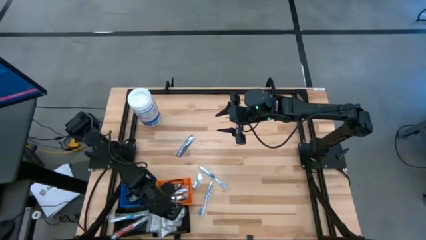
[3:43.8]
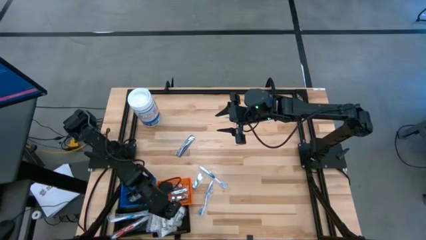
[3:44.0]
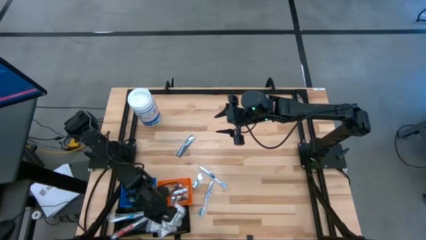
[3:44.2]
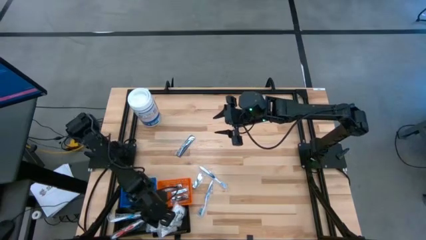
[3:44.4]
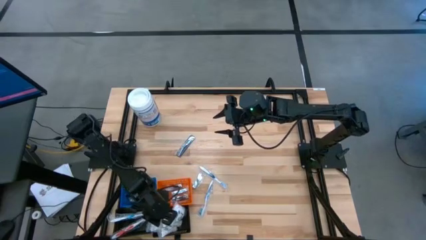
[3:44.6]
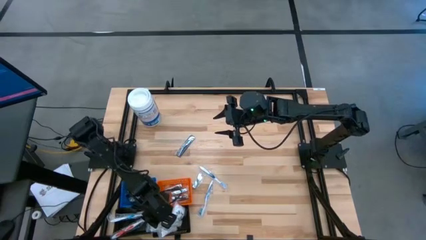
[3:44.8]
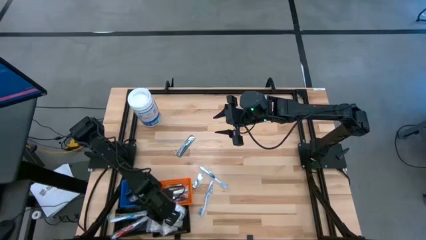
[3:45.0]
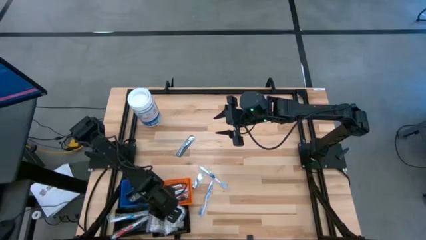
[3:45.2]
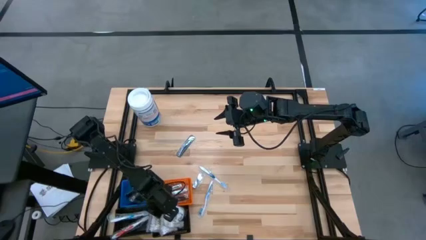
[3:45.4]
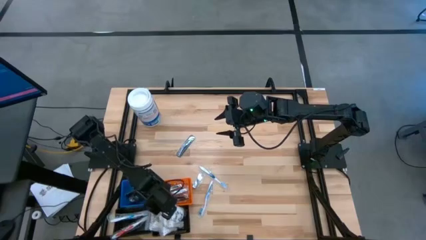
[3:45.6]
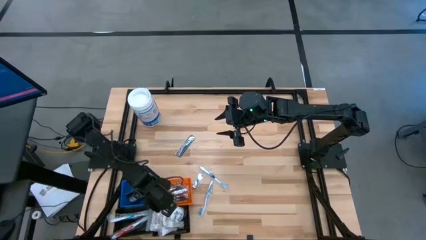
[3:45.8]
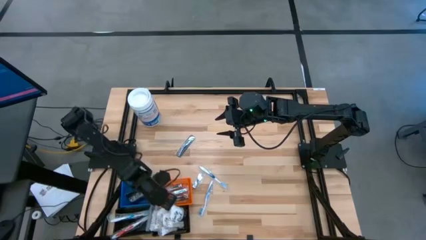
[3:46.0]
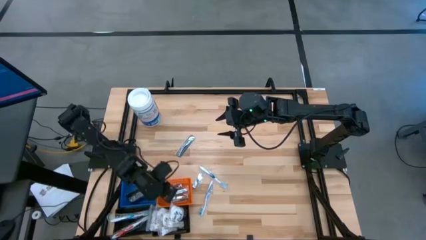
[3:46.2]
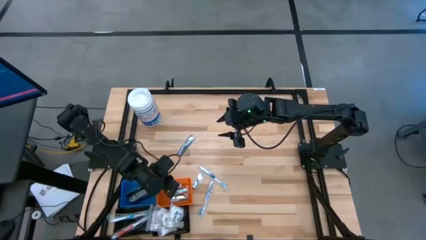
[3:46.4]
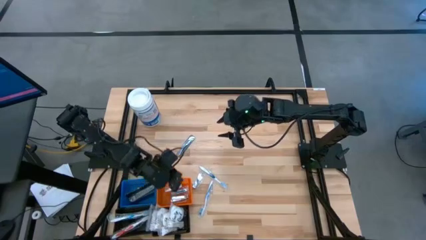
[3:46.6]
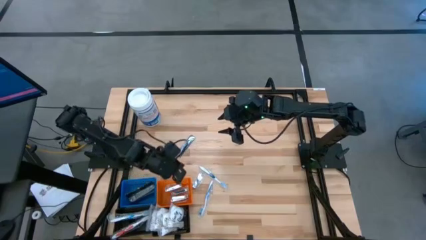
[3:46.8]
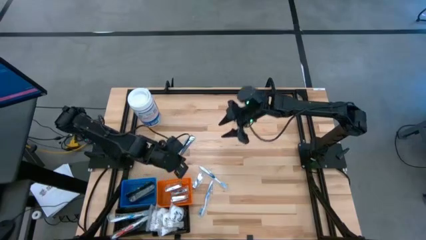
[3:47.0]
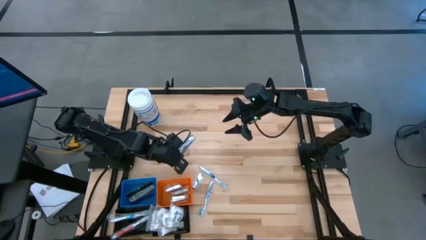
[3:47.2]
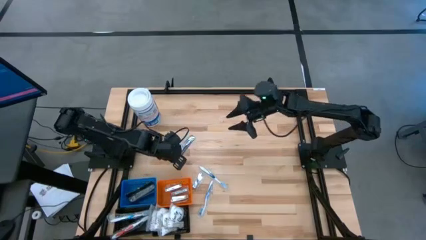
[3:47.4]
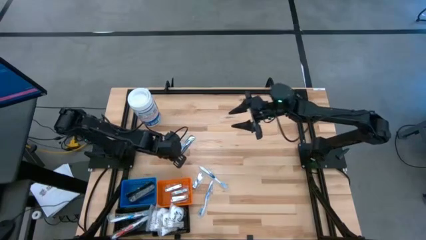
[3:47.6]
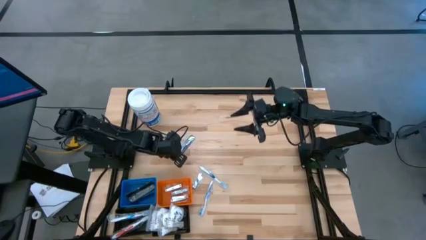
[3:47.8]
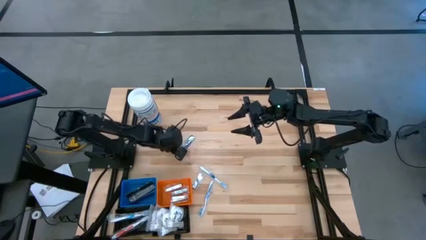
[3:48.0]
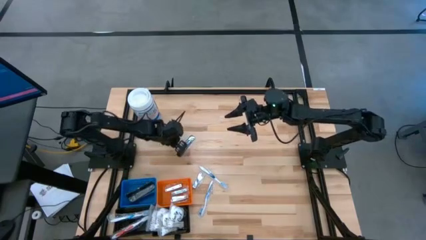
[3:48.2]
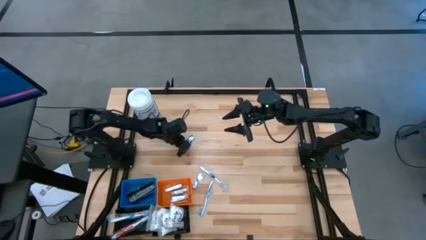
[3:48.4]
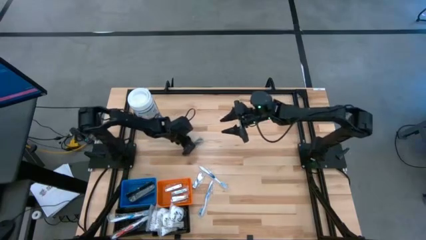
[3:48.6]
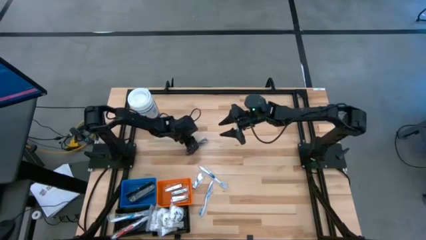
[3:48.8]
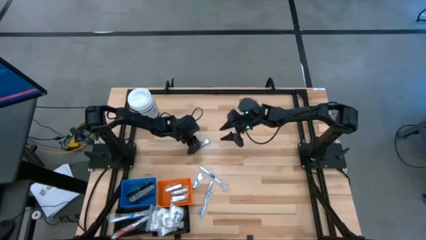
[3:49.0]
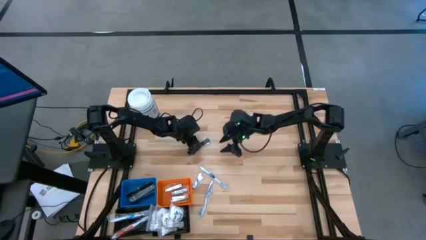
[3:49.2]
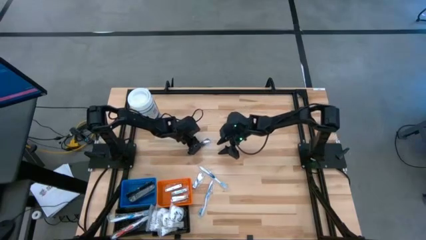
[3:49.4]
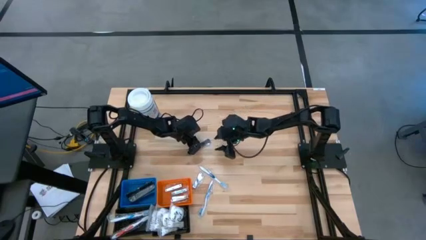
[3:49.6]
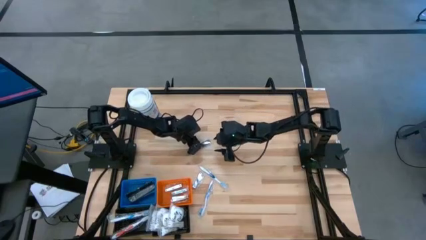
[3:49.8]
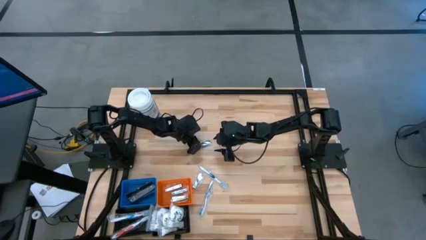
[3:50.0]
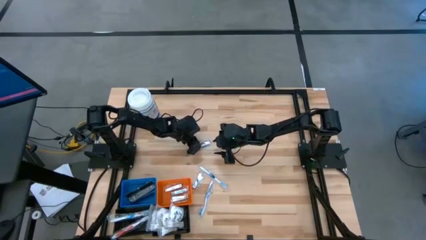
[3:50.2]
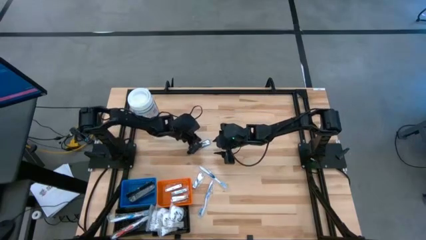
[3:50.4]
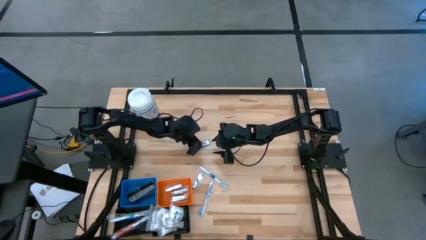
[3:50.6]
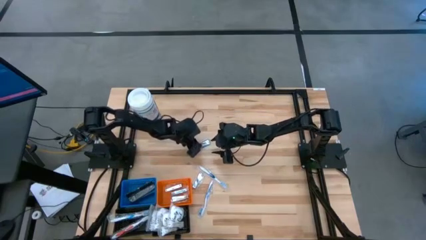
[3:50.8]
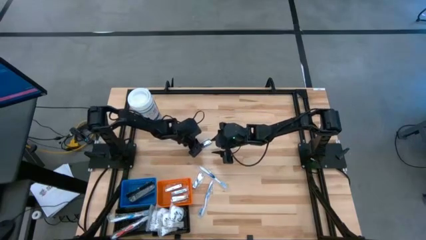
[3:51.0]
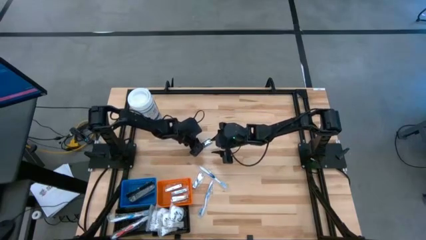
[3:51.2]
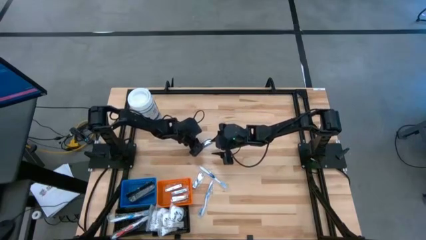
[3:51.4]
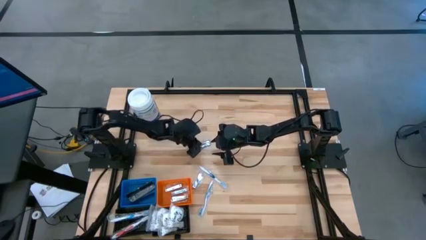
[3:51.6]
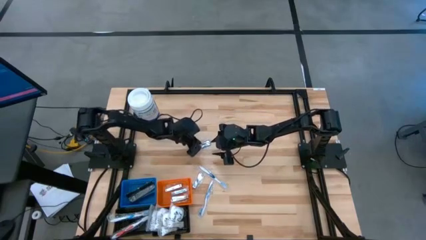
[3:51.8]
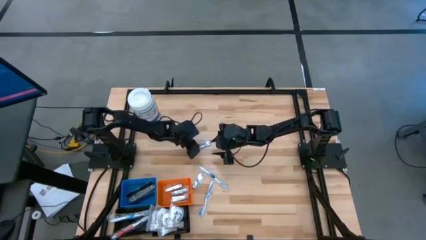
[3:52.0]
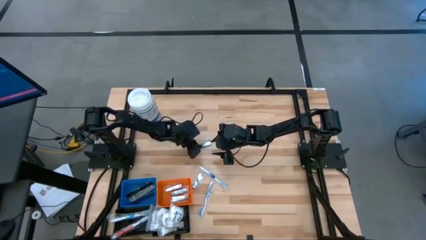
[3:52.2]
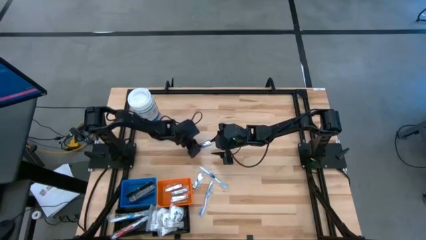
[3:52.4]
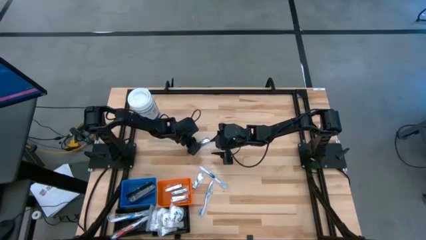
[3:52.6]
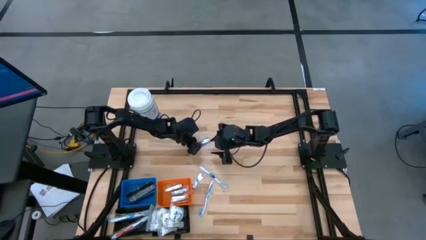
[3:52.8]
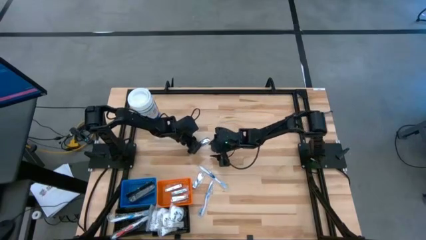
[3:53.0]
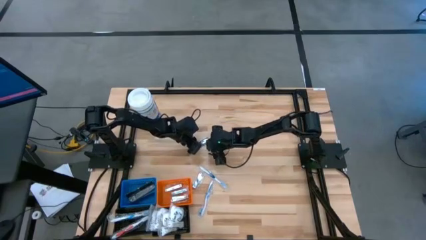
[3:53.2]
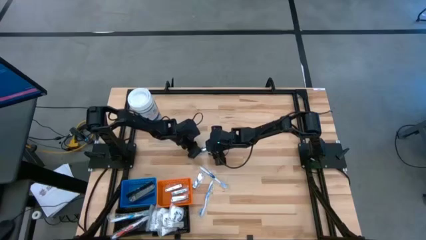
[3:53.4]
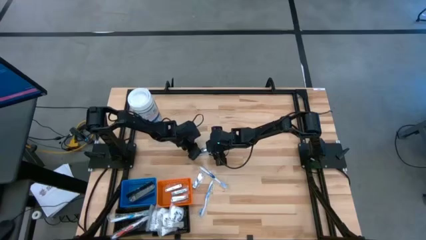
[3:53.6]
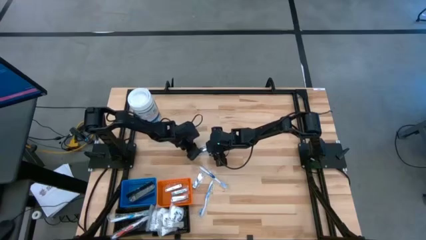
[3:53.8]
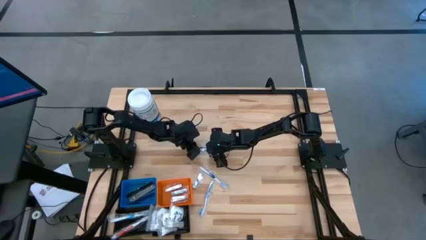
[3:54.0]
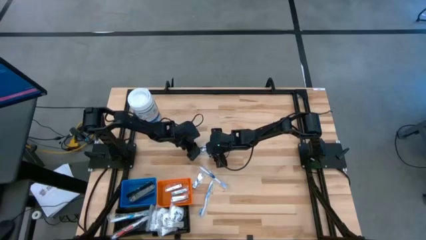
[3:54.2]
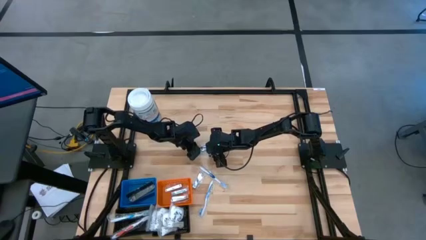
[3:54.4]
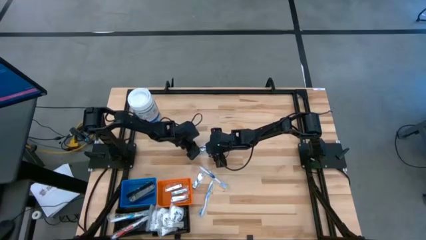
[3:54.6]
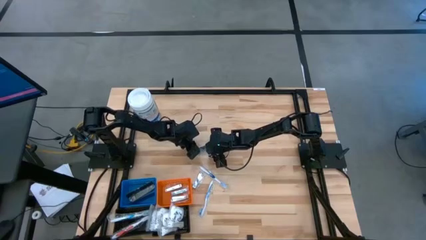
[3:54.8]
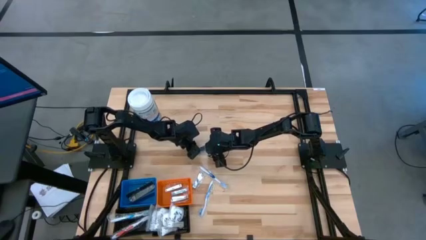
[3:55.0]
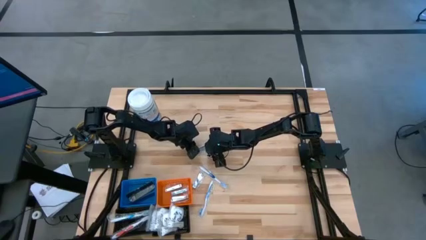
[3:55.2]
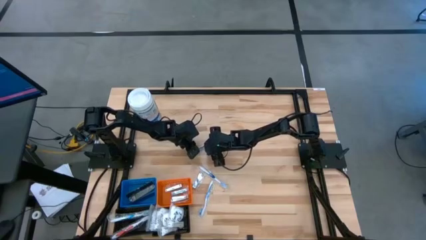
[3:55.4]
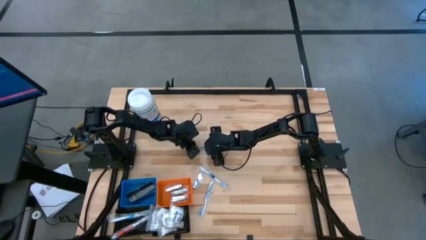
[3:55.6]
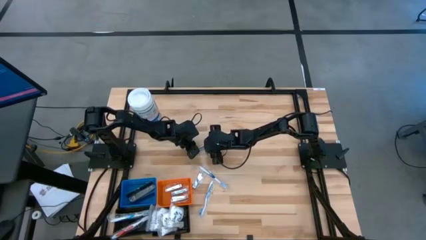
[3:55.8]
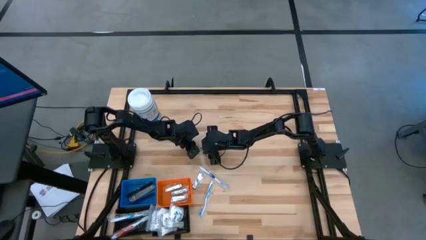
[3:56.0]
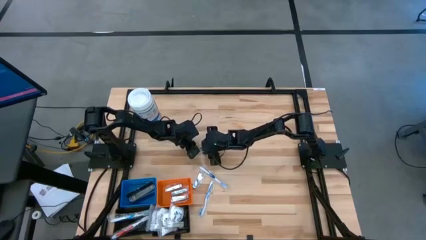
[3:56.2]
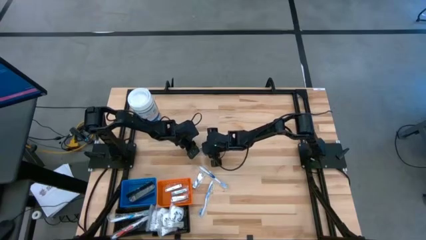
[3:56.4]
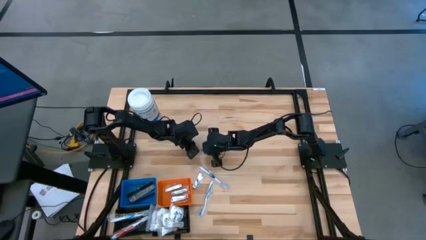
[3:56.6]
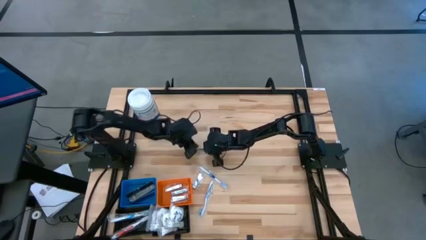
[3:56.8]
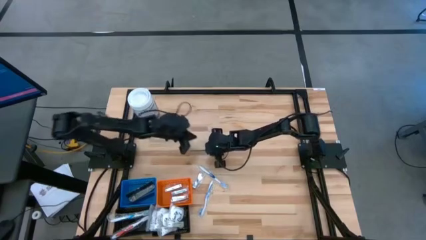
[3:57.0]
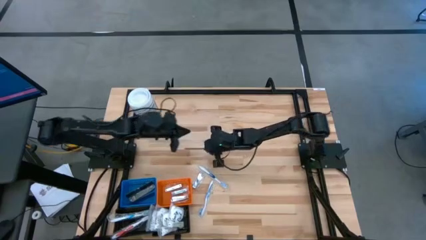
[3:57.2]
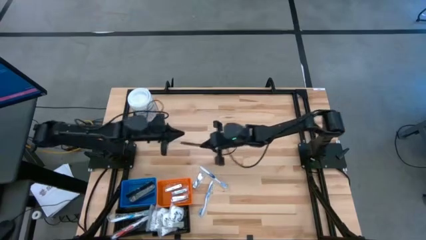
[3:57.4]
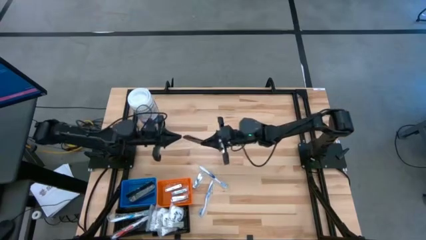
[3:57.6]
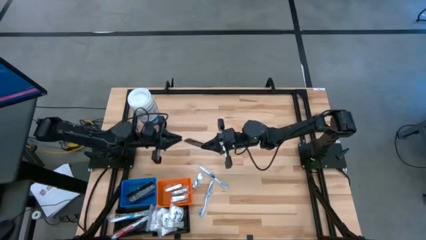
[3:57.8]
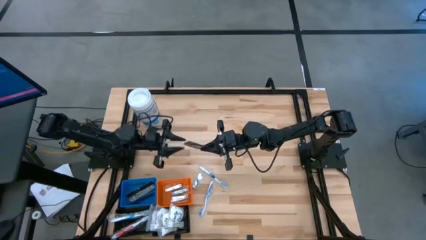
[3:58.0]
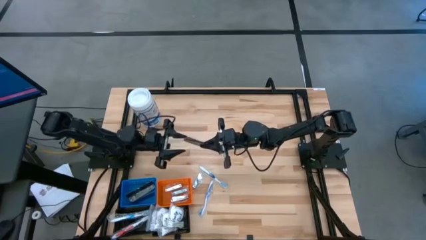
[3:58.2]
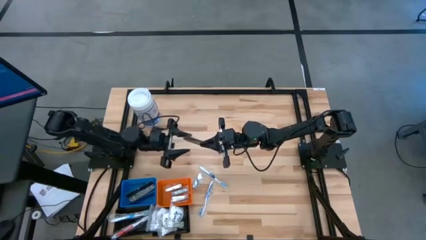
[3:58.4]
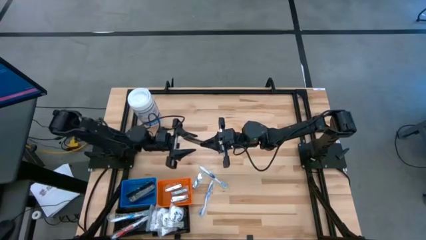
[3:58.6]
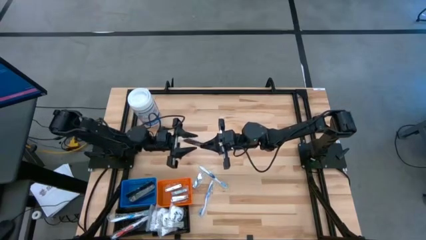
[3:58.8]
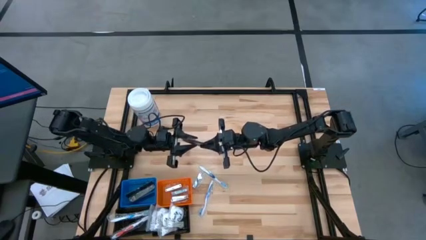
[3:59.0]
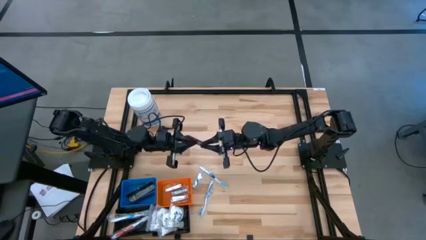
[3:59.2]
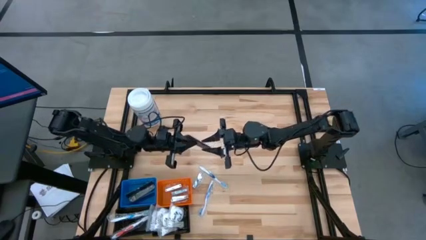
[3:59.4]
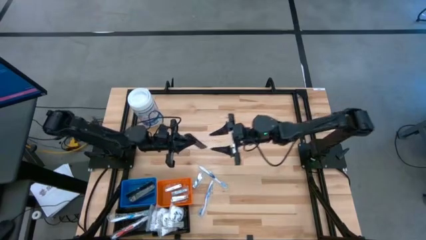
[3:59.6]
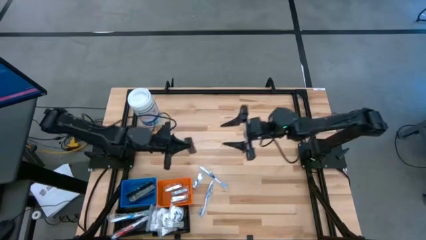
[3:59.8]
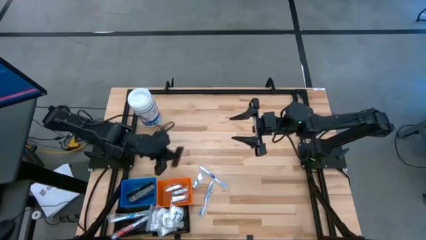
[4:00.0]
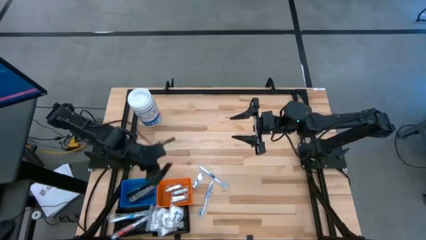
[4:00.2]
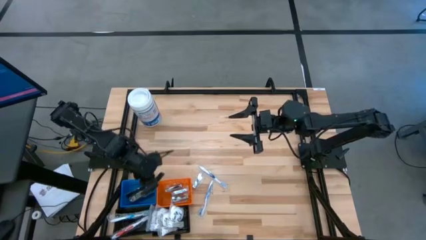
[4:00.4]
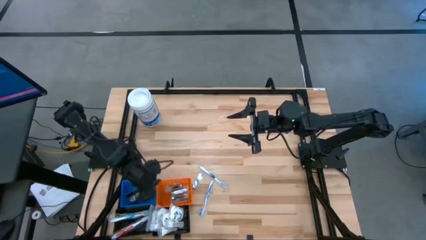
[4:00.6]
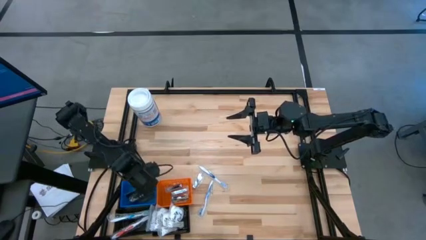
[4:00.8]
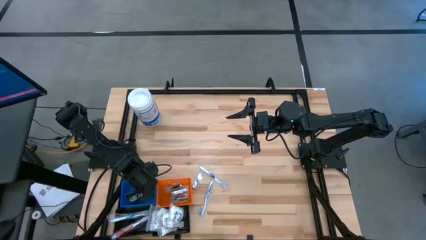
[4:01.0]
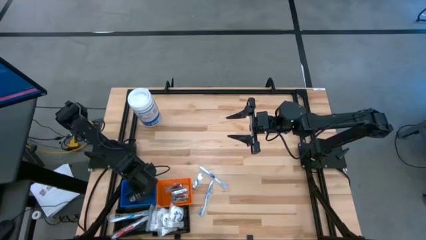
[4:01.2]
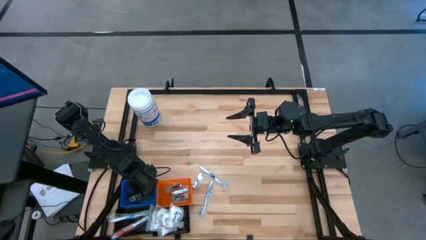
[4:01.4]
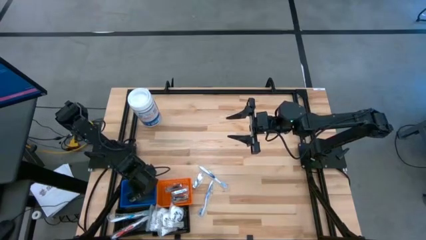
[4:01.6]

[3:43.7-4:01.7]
Task: Pick & Place Travel size toiletries
Put the black comb into the blue basket
